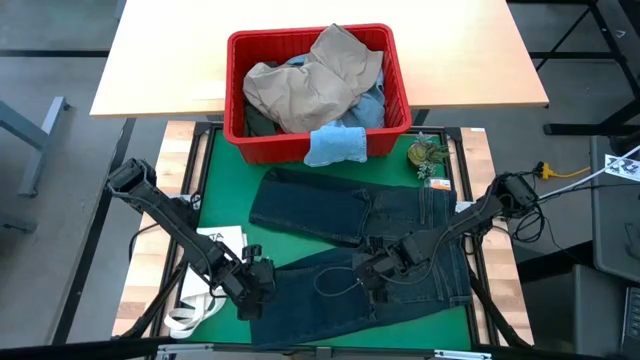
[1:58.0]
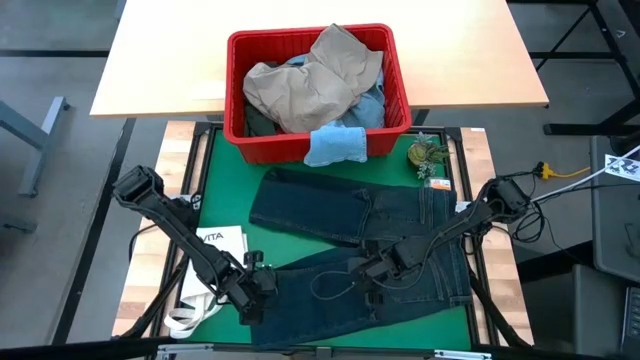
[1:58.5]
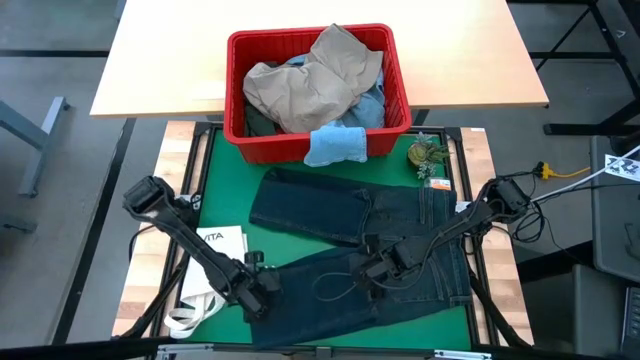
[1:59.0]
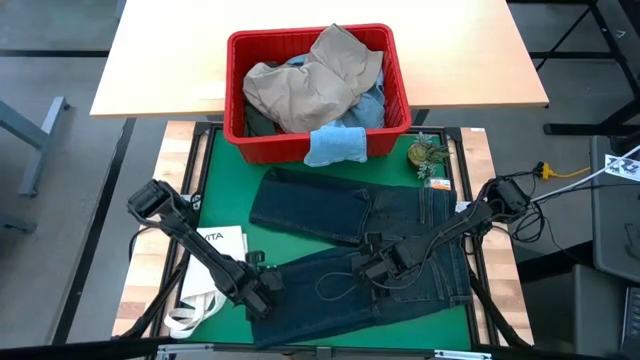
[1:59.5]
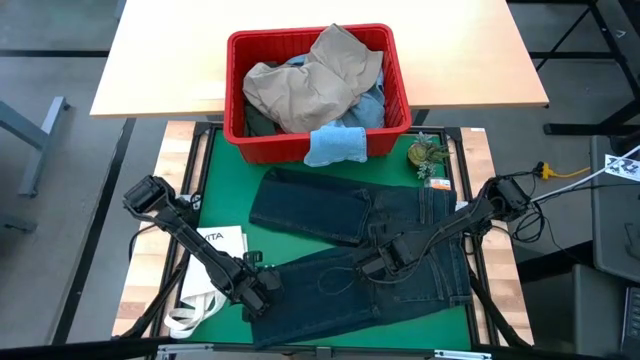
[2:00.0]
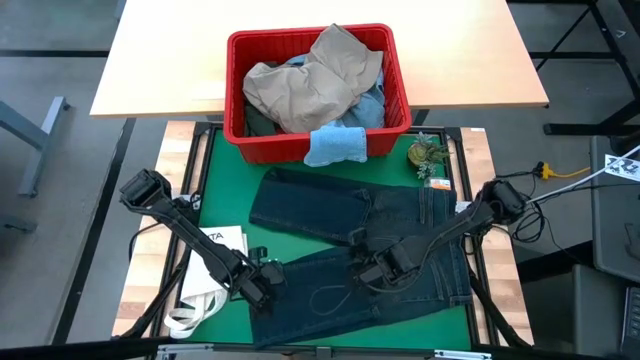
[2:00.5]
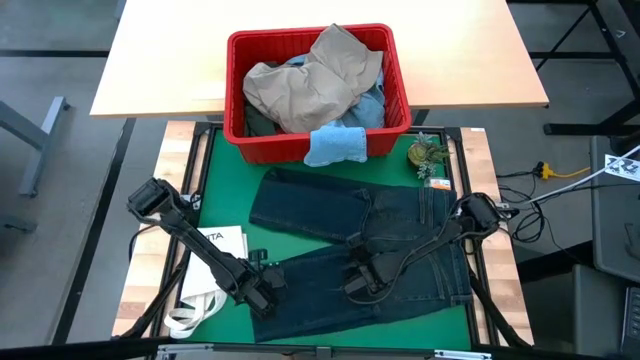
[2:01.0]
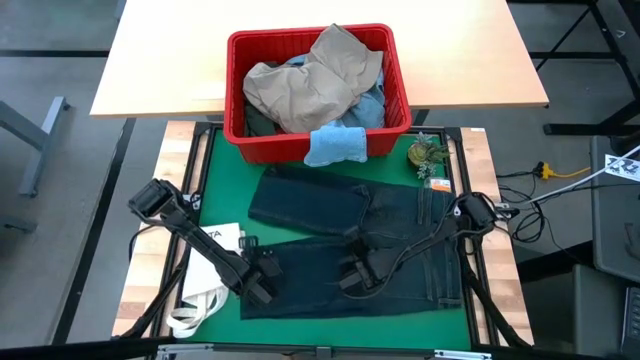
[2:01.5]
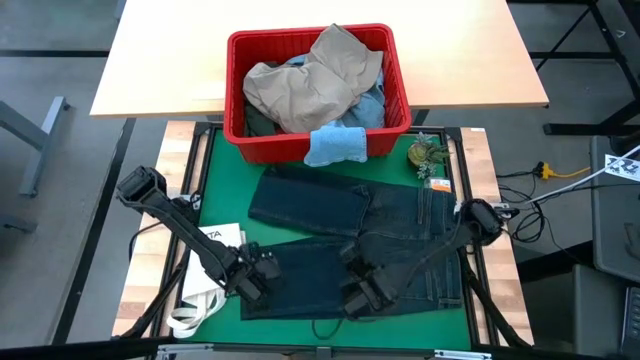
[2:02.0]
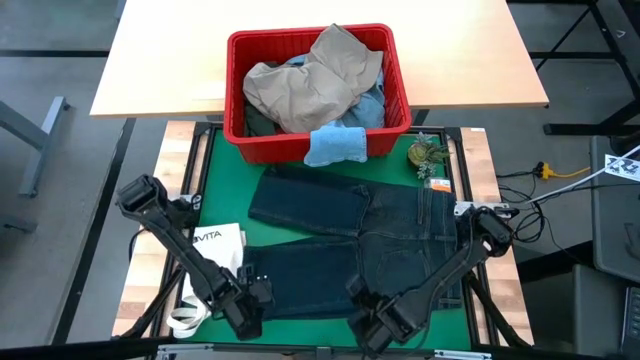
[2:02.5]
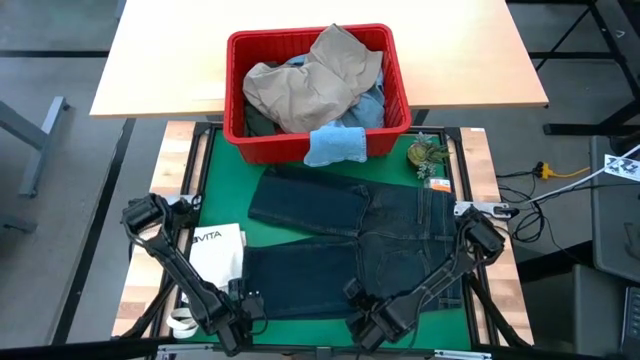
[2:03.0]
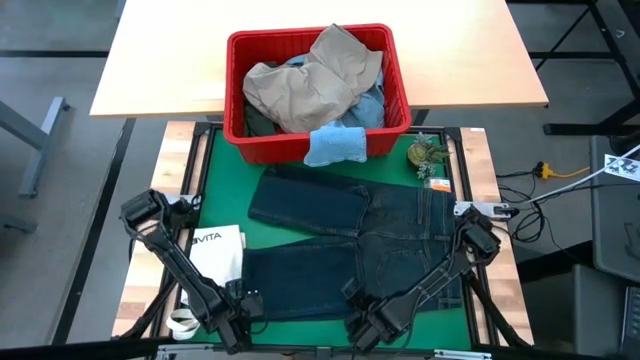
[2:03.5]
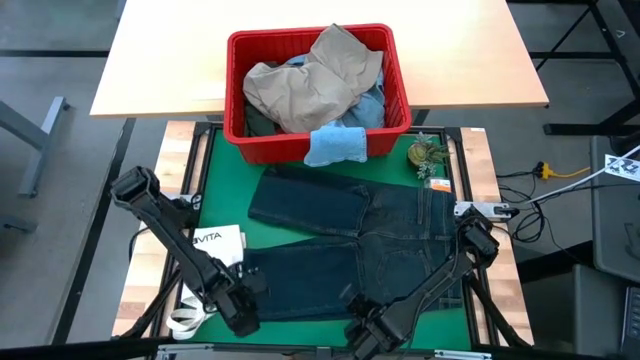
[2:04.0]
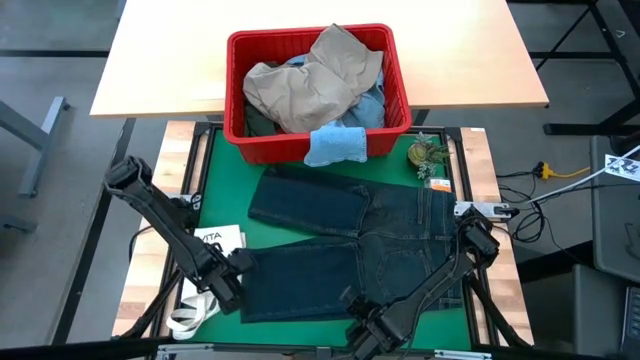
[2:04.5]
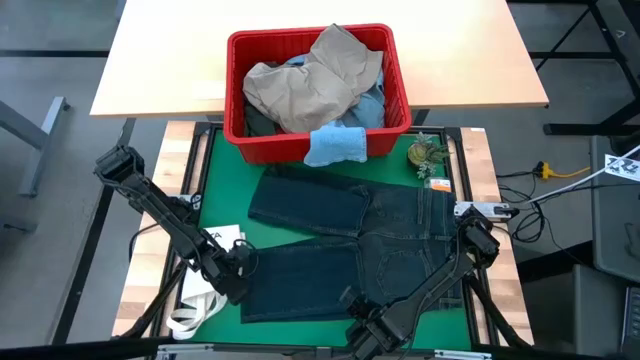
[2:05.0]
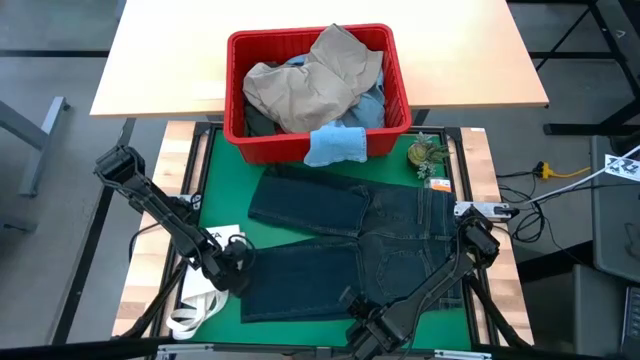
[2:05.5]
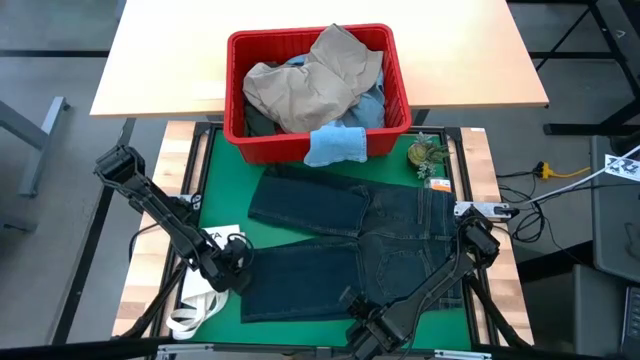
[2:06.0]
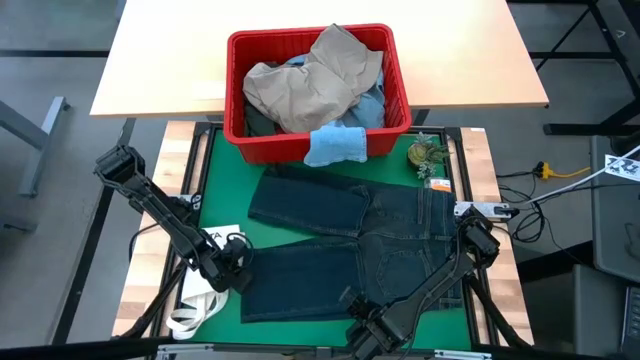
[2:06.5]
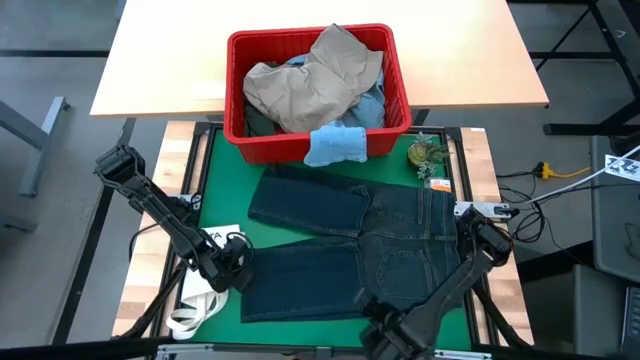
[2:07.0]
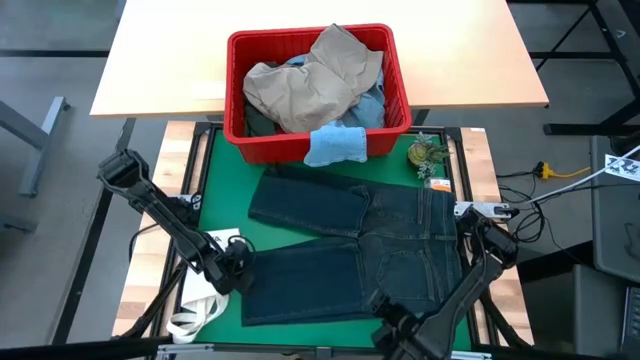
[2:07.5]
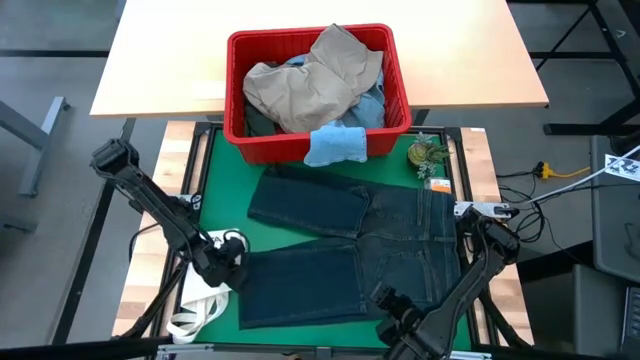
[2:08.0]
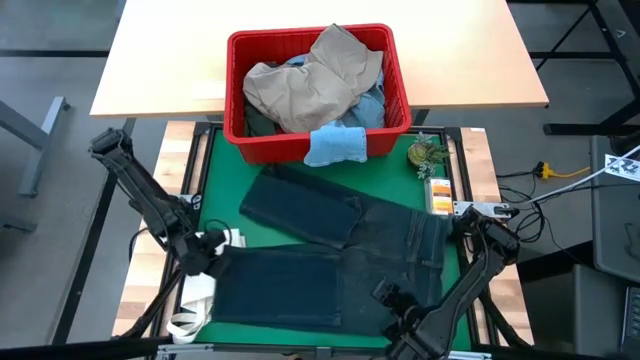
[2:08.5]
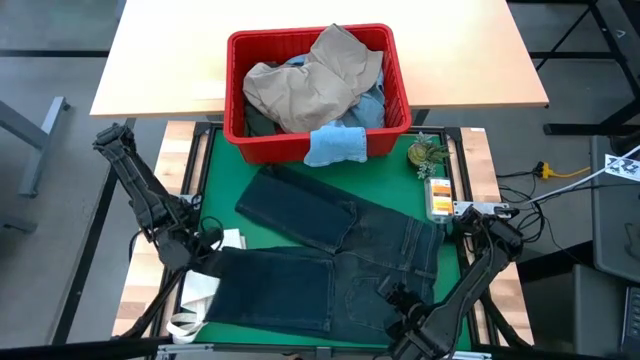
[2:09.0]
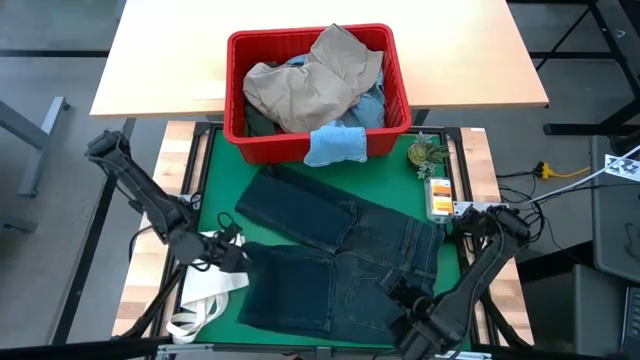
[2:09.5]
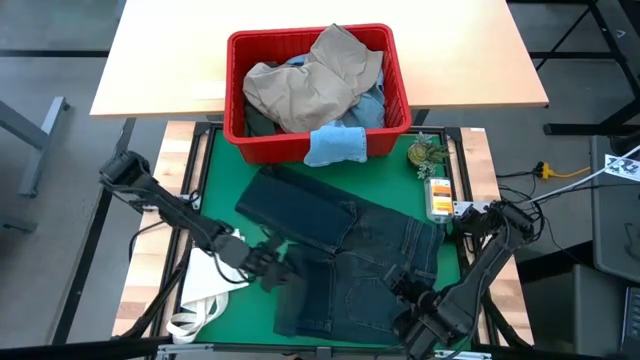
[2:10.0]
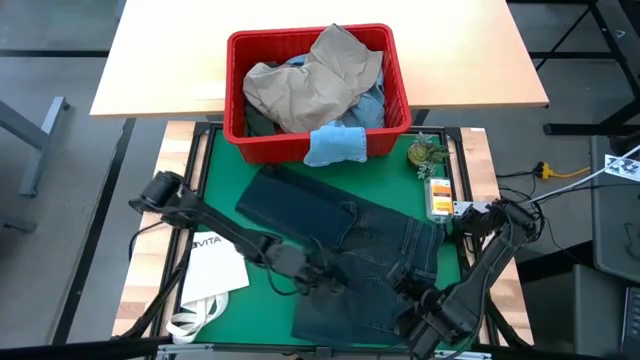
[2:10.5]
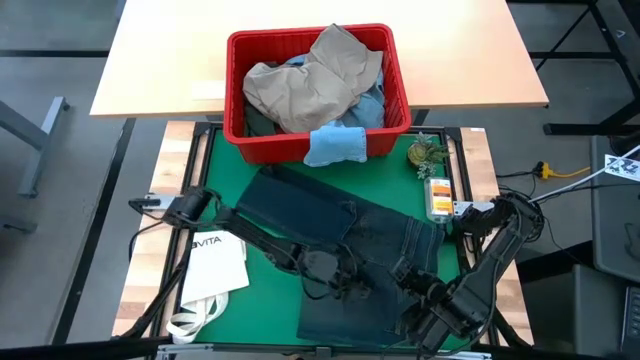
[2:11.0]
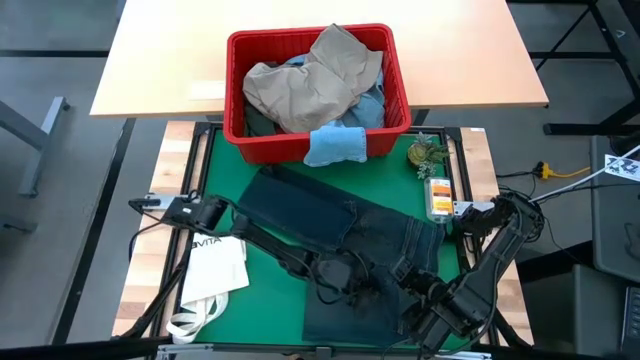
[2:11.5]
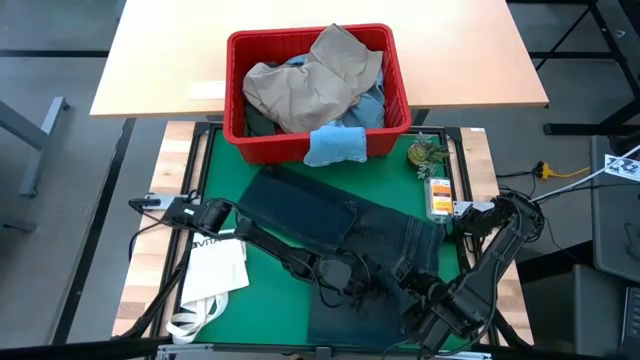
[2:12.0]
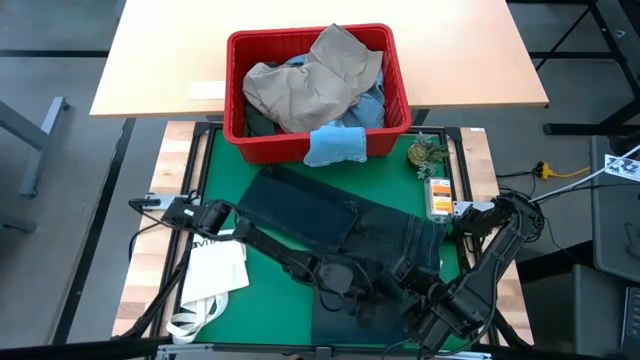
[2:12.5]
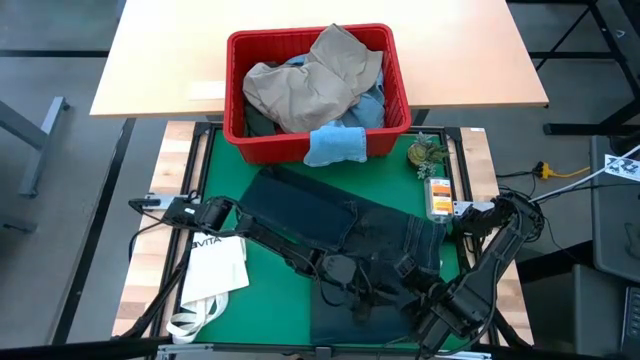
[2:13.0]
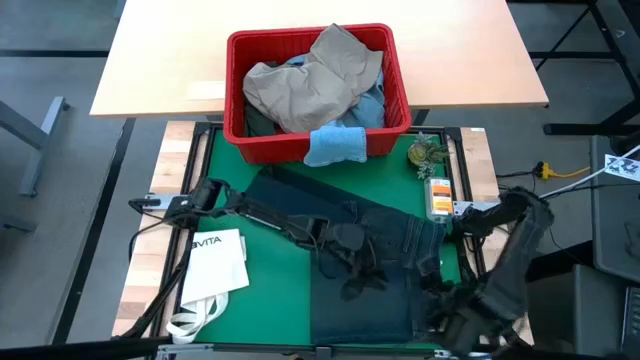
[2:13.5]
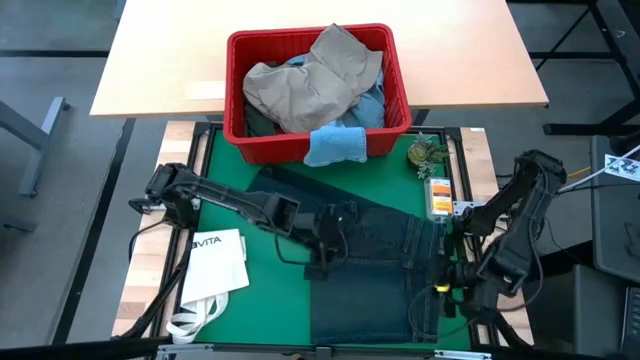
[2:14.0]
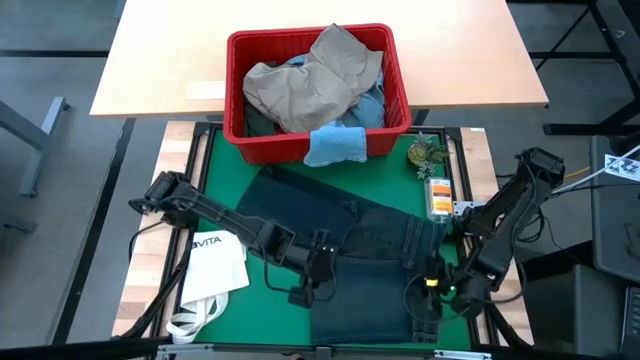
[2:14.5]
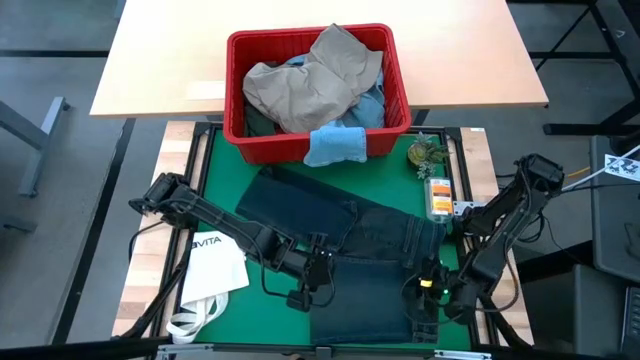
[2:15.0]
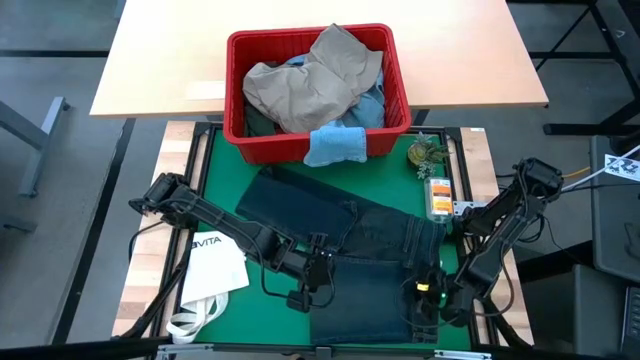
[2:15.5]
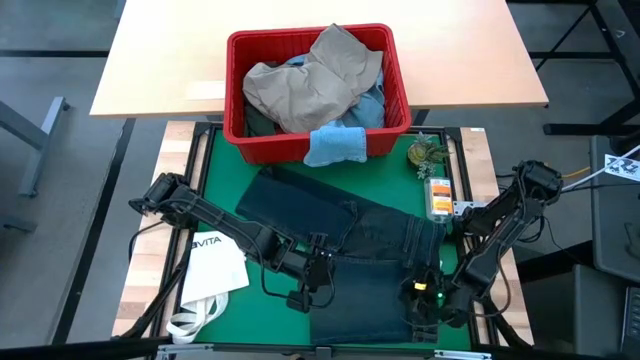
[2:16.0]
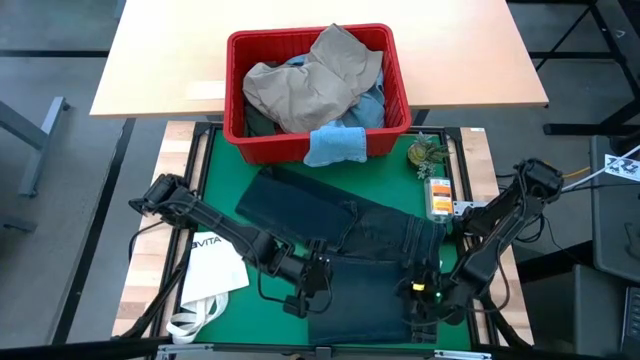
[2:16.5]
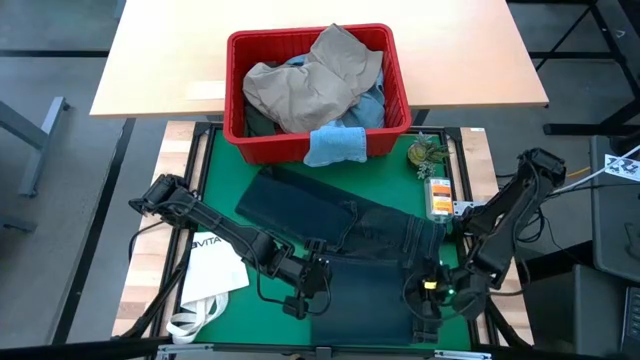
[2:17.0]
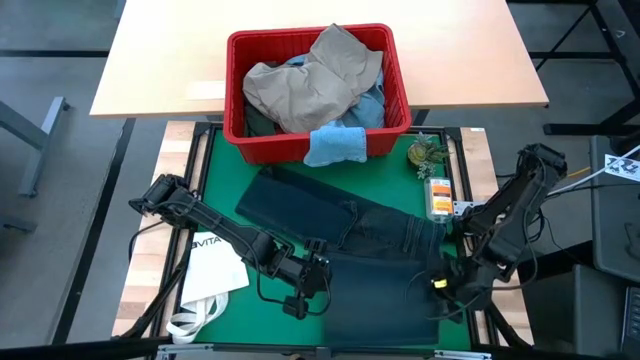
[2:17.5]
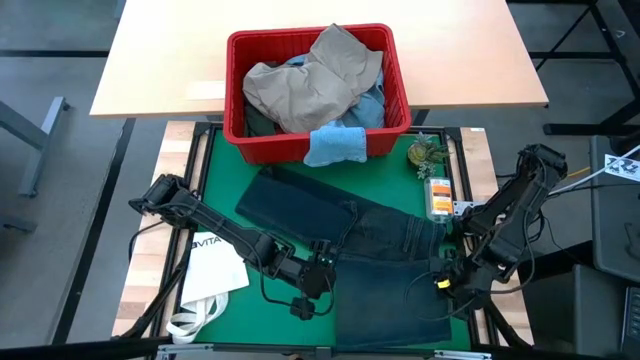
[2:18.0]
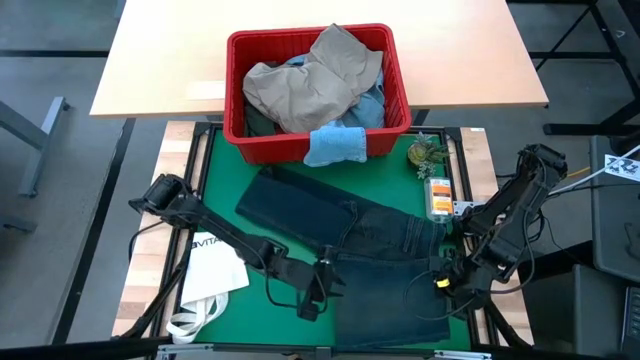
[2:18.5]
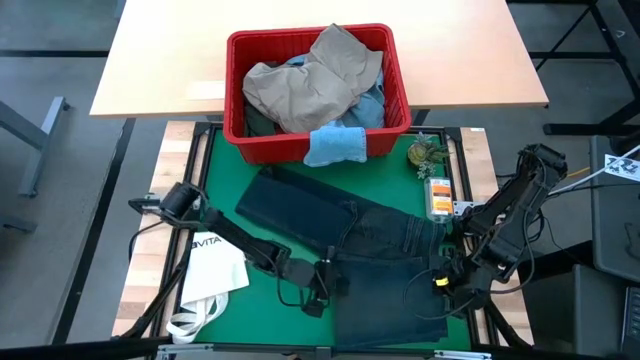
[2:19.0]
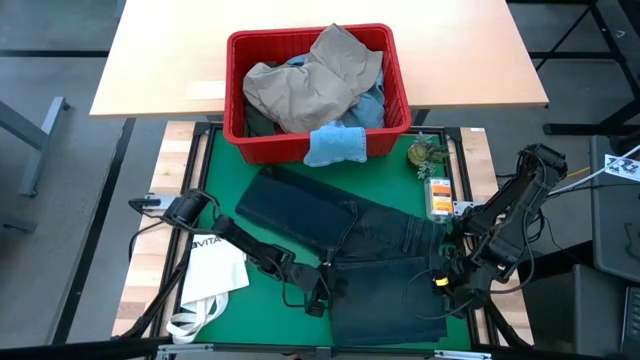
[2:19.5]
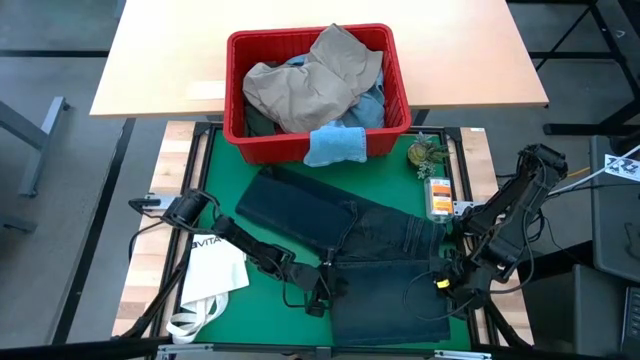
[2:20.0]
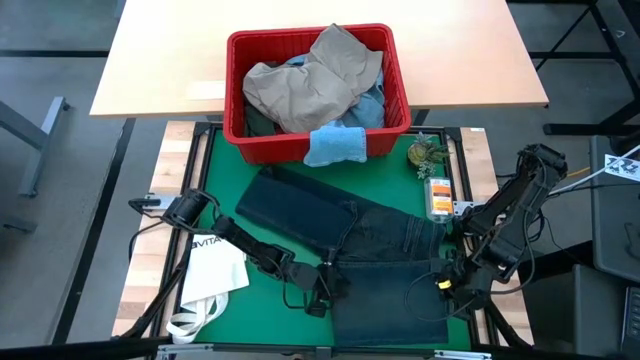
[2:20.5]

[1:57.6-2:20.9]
Task: Fold Laundry from Bin
Fold the dark blue pants
